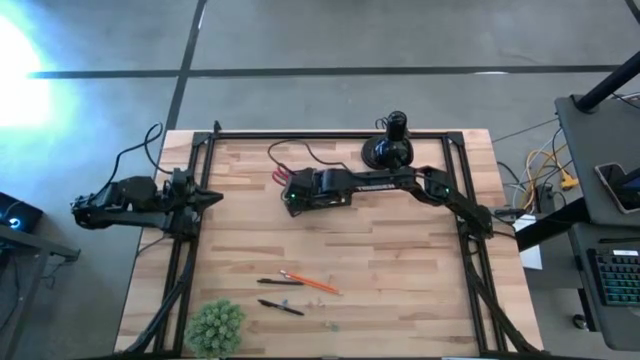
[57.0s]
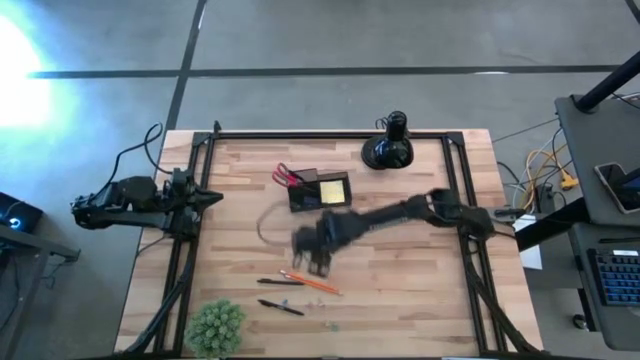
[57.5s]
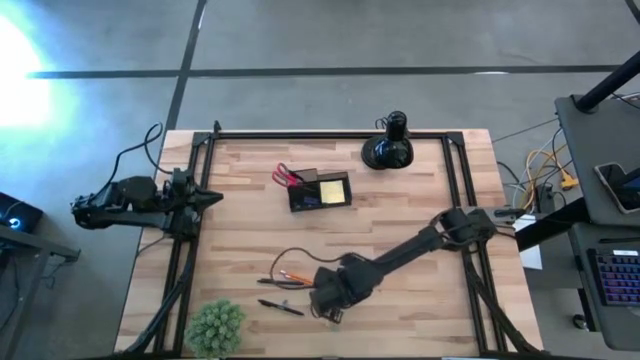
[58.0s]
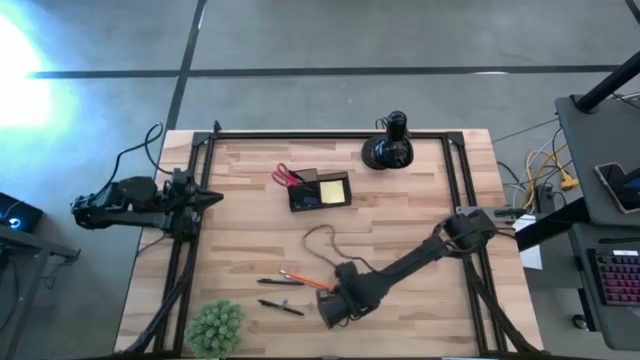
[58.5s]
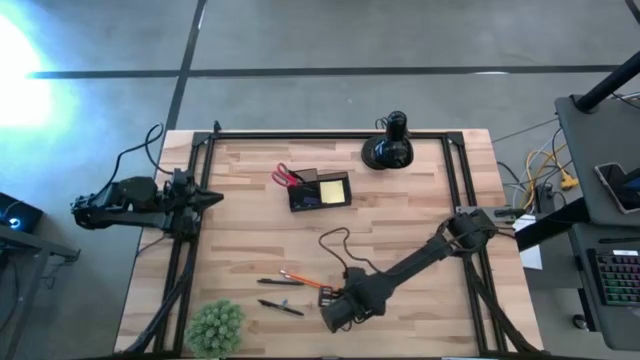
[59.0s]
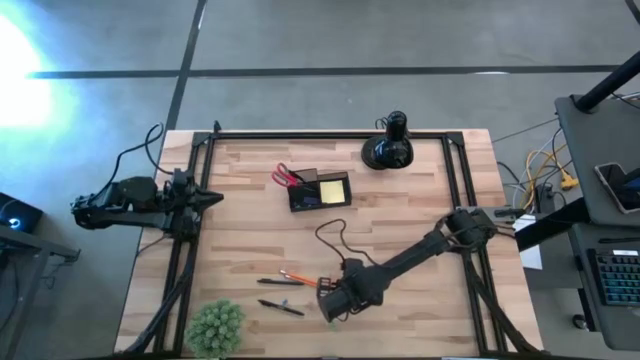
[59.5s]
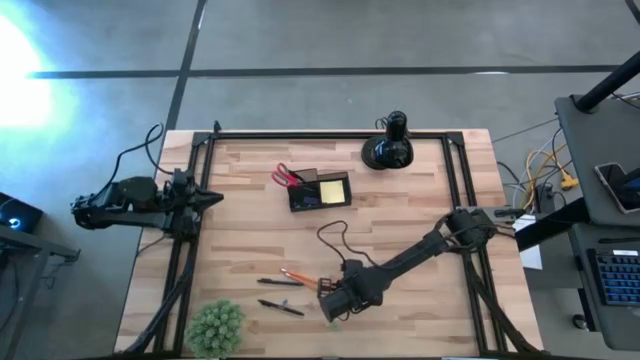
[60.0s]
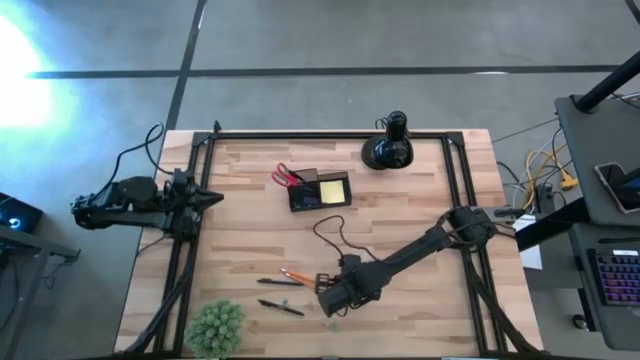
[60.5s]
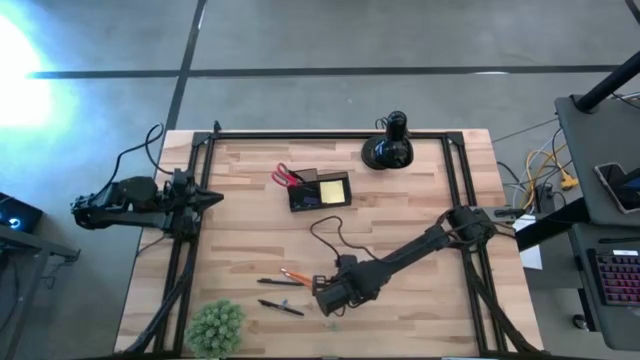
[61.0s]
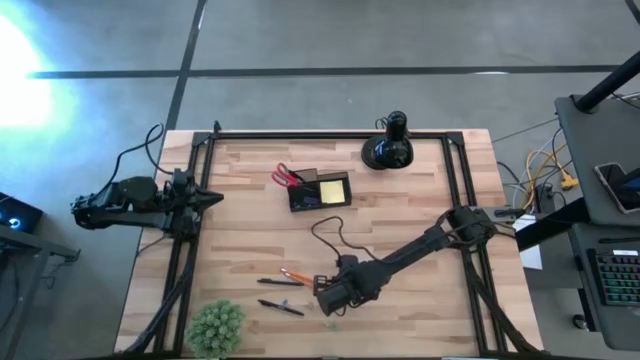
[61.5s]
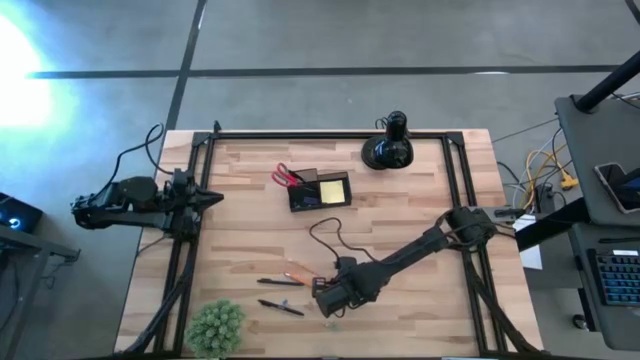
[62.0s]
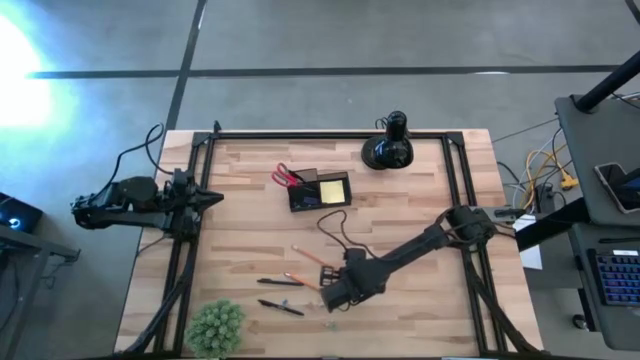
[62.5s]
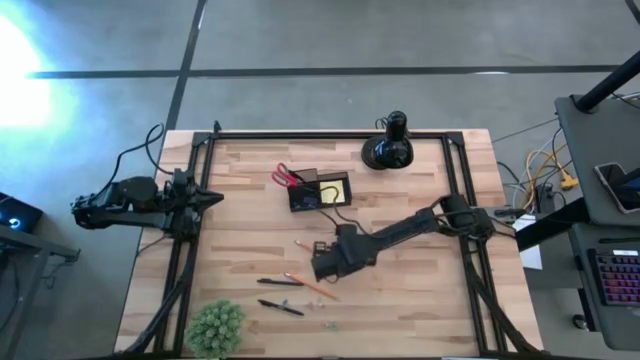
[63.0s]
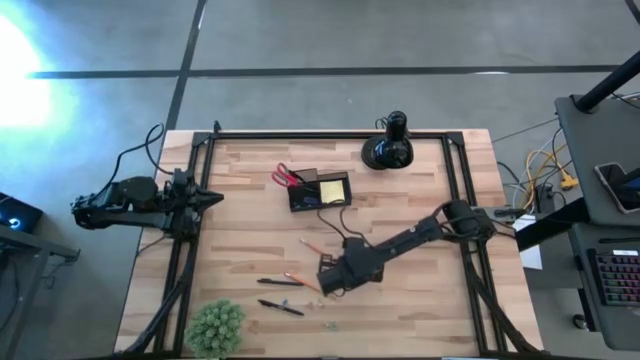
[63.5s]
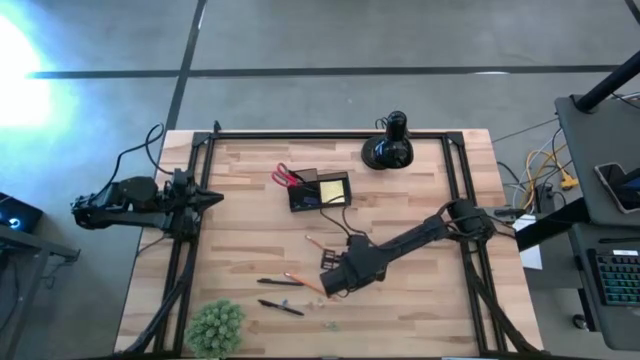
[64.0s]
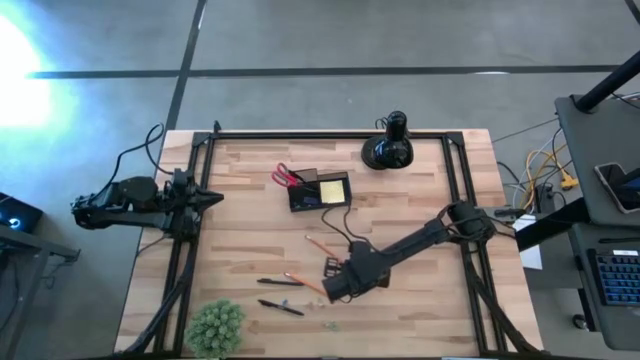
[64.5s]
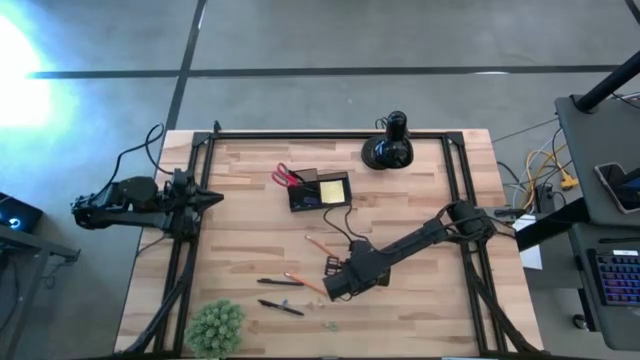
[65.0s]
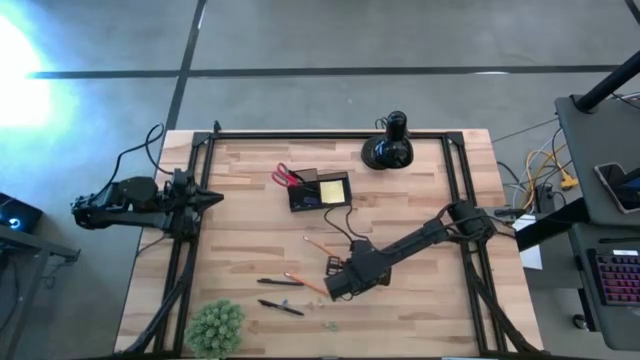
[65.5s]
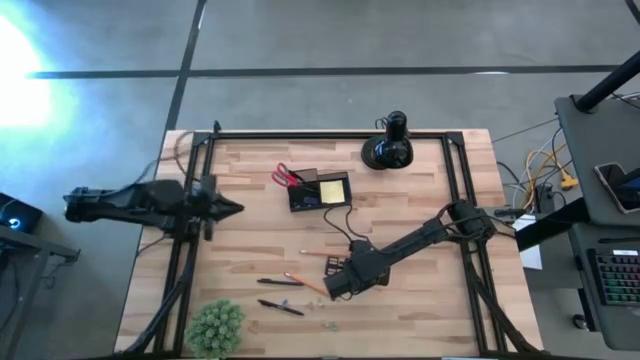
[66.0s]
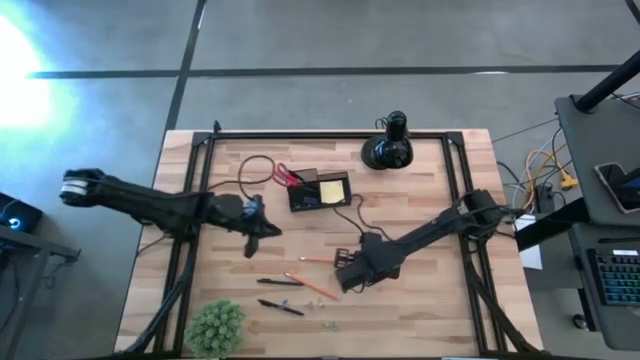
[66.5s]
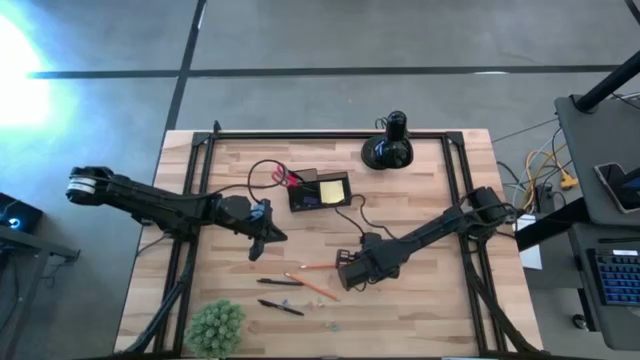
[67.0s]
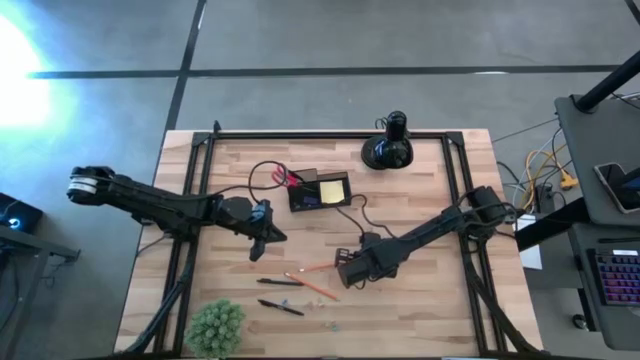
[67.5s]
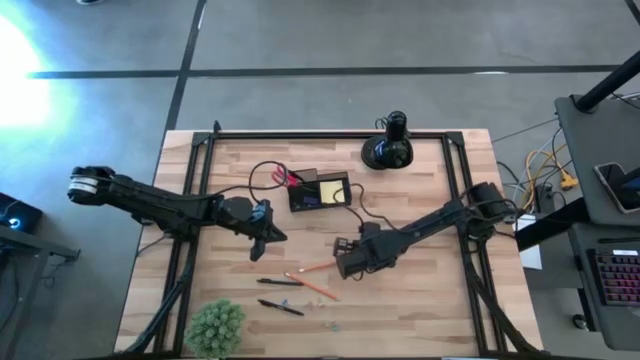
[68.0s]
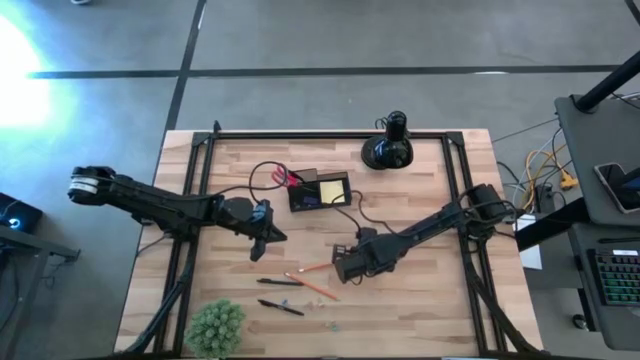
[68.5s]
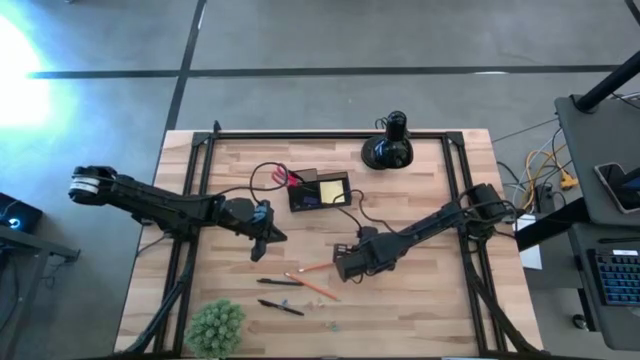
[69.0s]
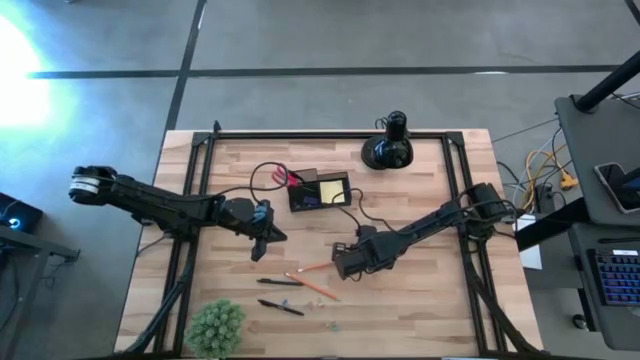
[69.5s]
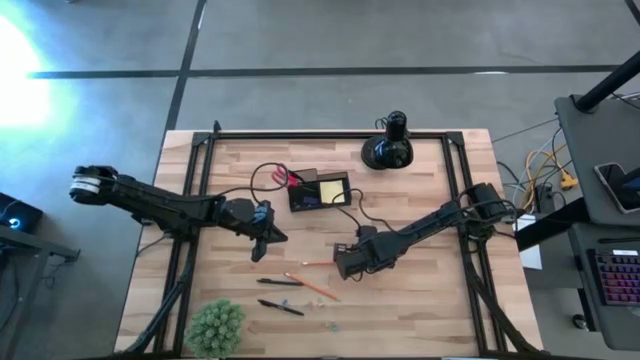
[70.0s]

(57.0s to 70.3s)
Task: Pick and place office supplies into organizer
Put the top pencil into the black organizer

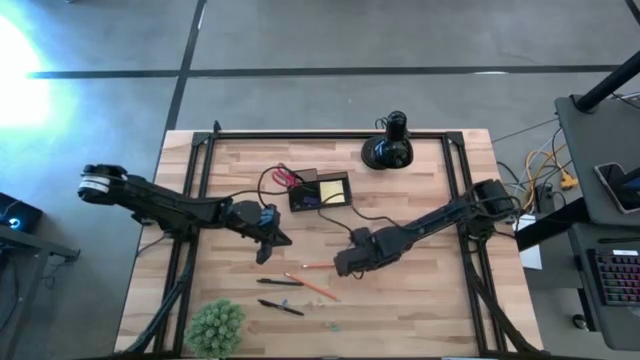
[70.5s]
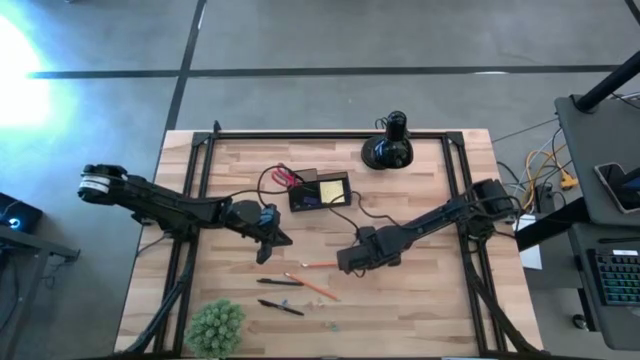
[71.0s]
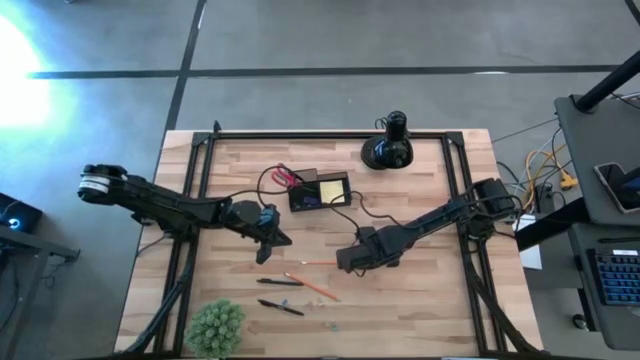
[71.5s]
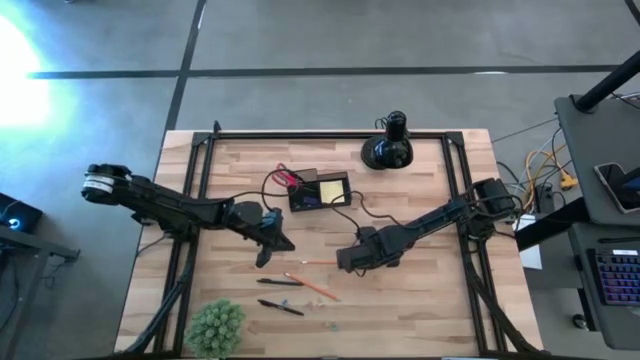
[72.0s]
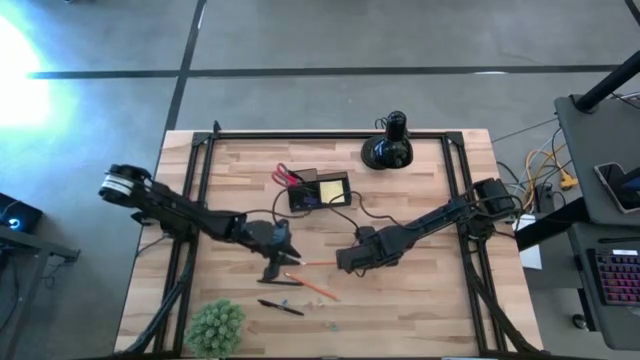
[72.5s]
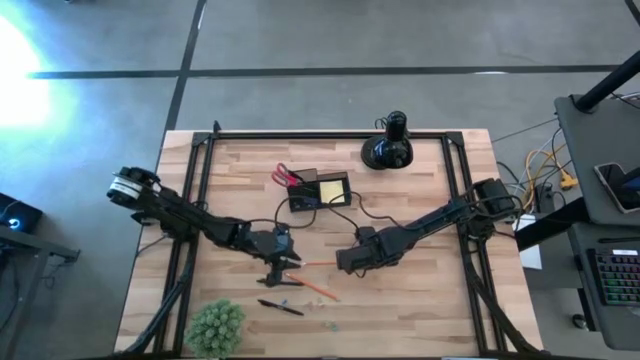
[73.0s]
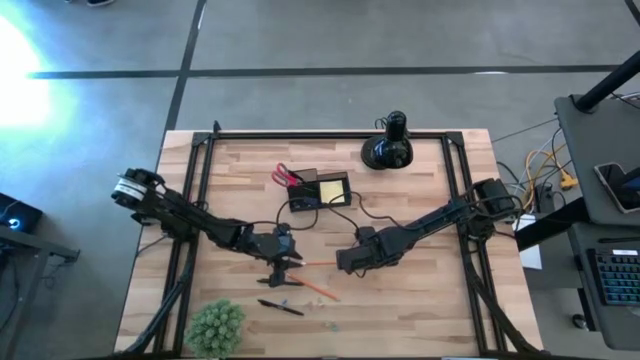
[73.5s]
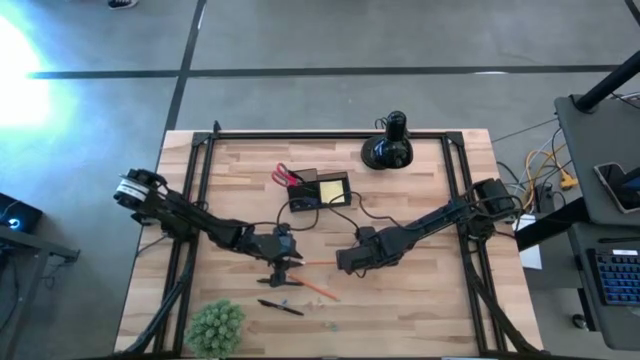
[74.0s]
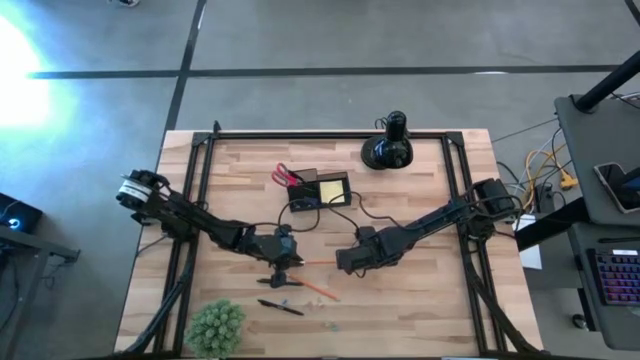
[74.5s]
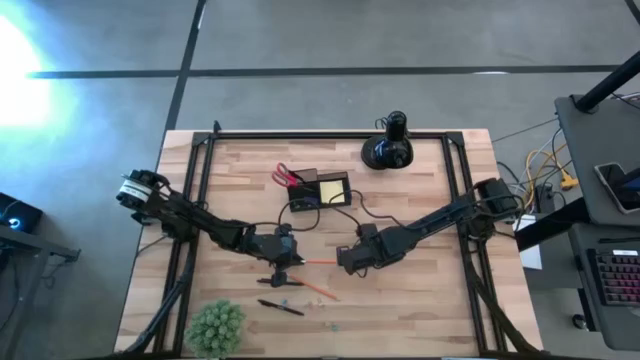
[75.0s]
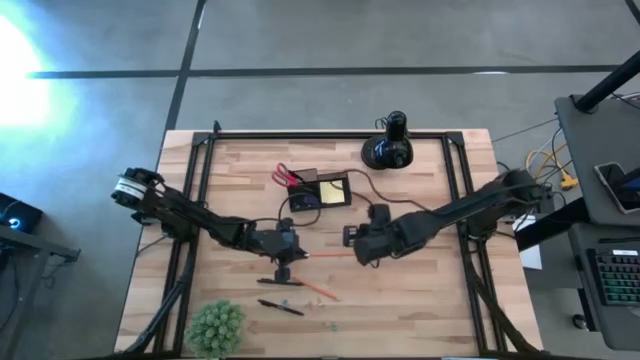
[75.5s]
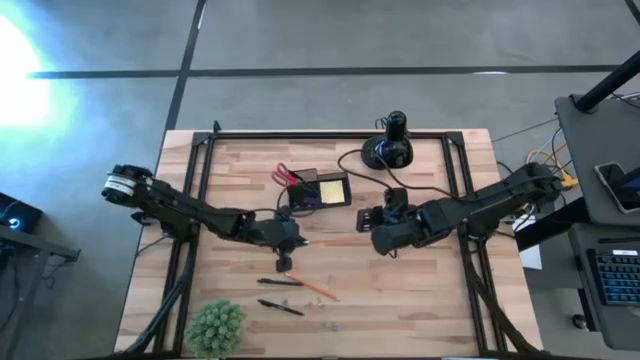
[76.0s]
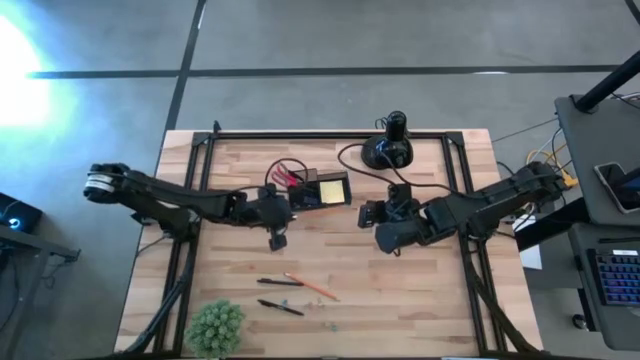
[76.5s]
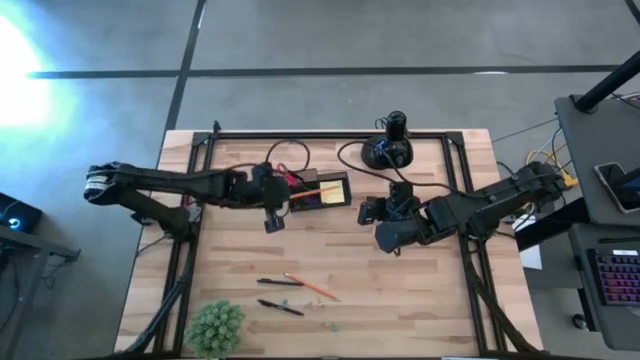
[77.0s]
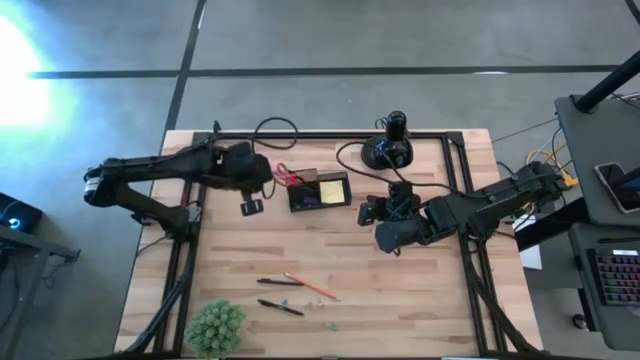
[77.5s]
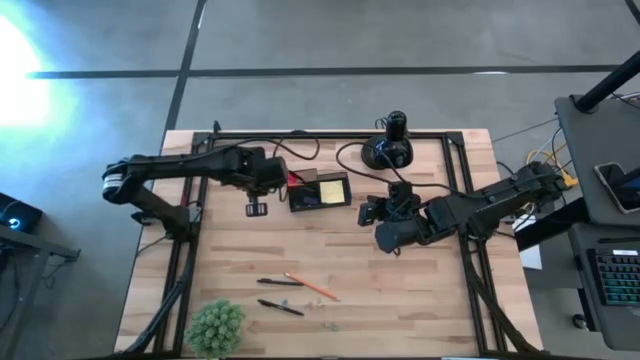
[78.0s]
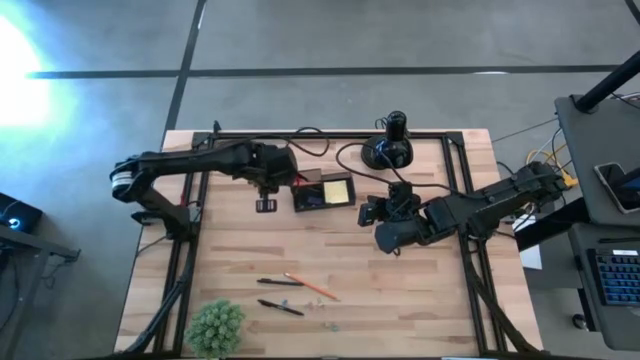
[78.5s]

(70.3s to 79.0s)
Put the top pencil into the black organizer
